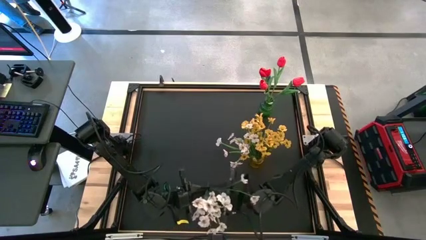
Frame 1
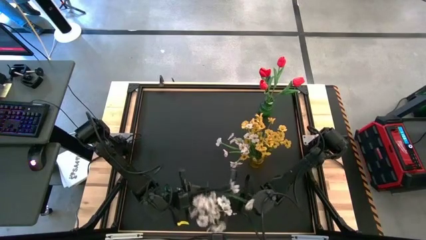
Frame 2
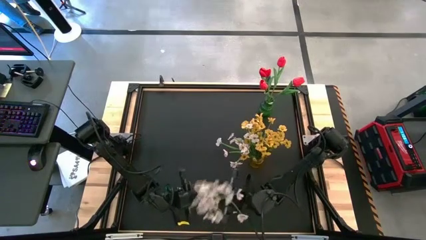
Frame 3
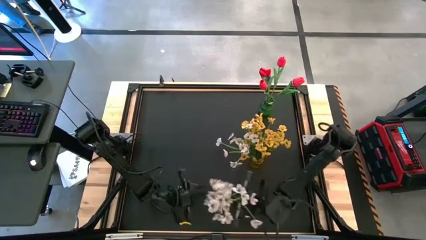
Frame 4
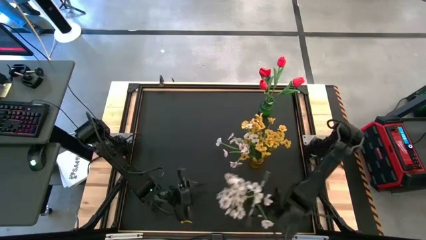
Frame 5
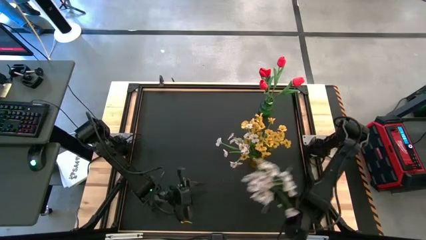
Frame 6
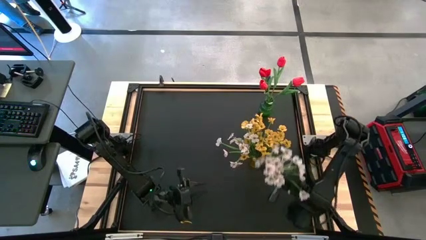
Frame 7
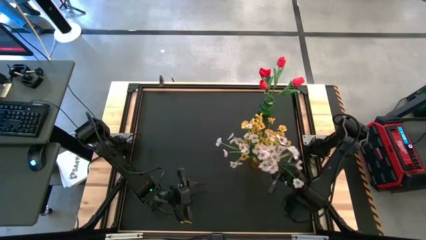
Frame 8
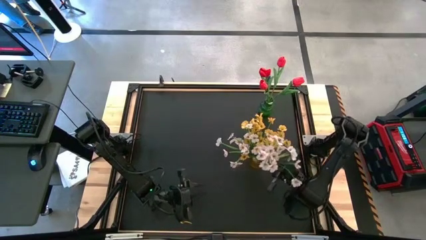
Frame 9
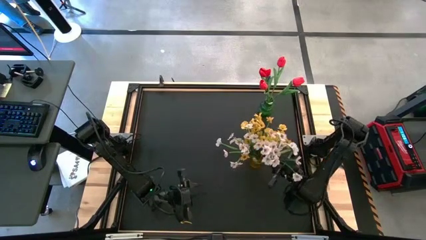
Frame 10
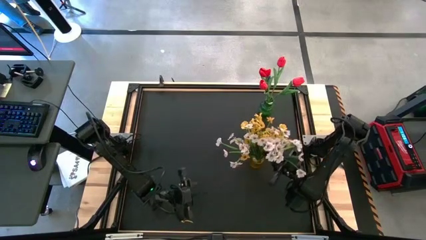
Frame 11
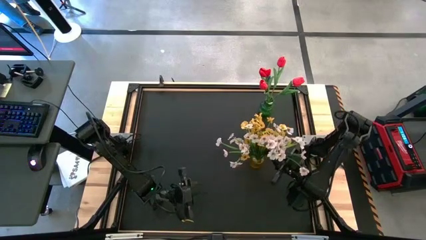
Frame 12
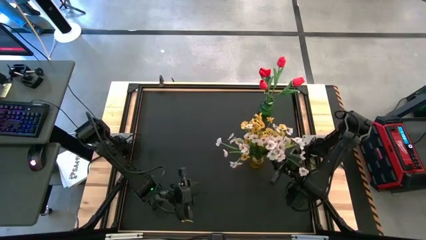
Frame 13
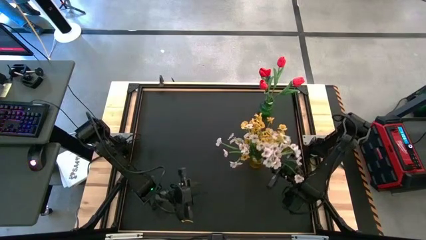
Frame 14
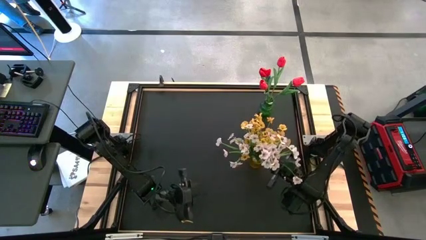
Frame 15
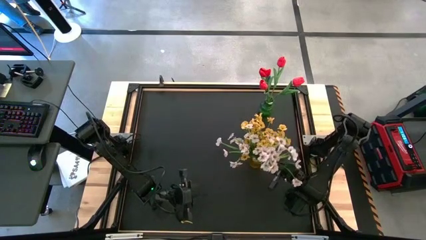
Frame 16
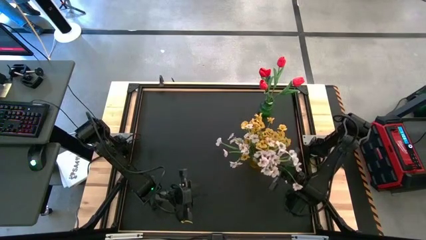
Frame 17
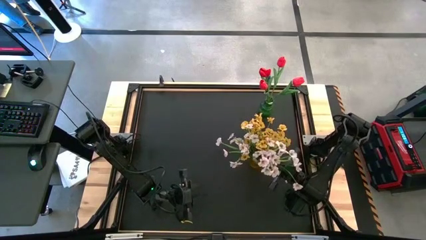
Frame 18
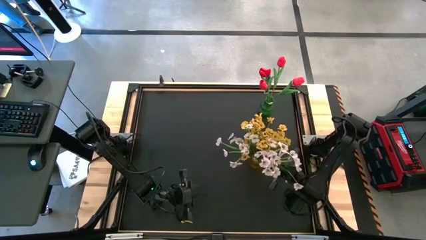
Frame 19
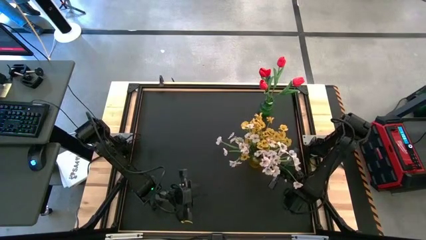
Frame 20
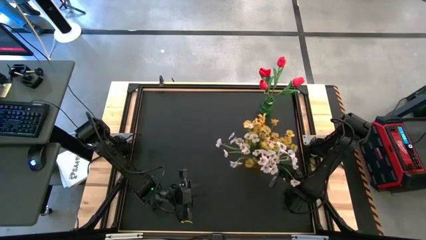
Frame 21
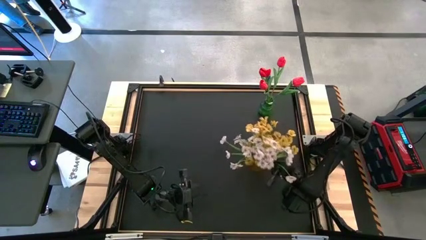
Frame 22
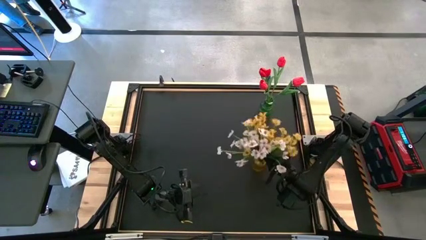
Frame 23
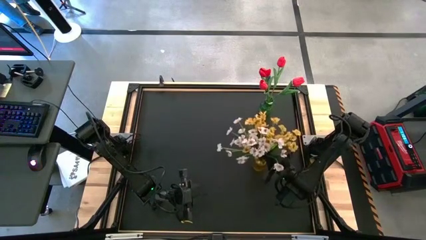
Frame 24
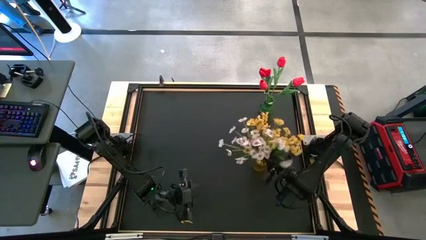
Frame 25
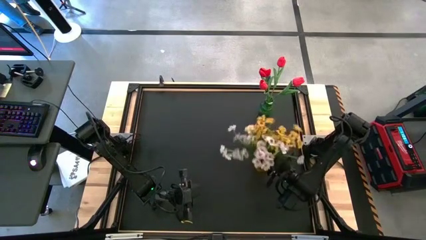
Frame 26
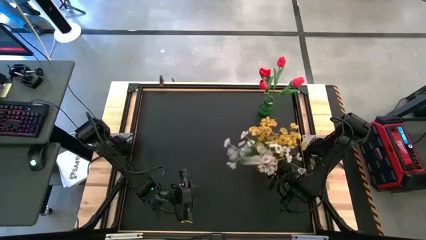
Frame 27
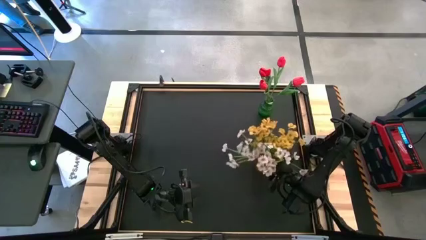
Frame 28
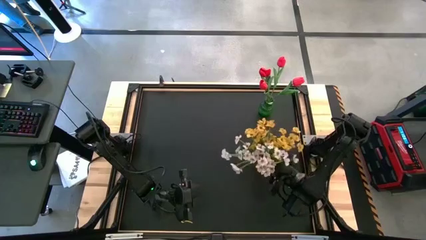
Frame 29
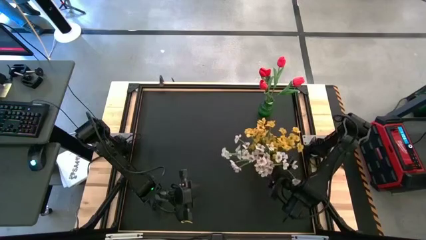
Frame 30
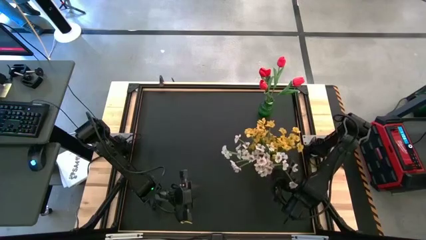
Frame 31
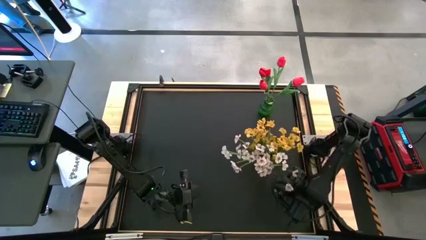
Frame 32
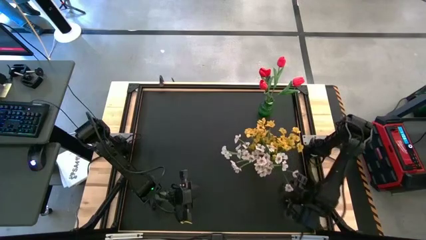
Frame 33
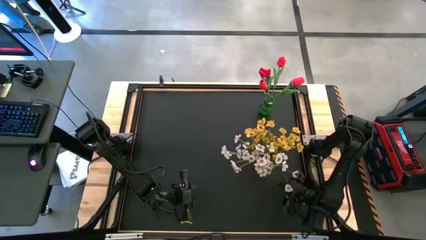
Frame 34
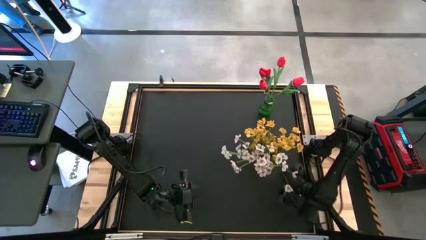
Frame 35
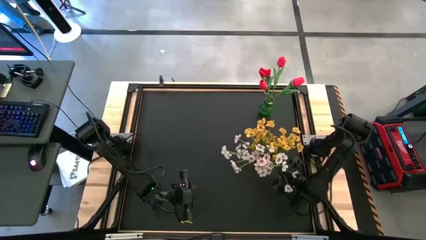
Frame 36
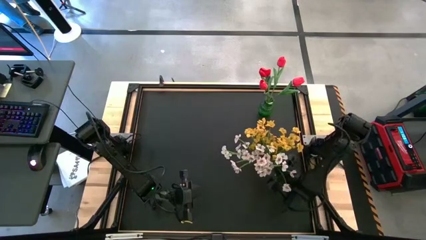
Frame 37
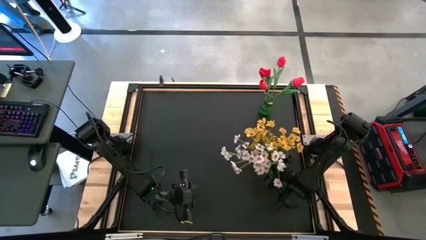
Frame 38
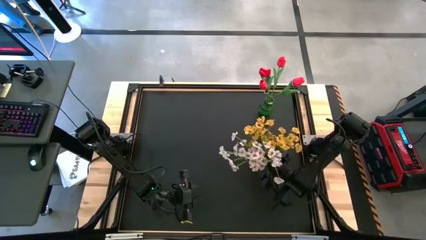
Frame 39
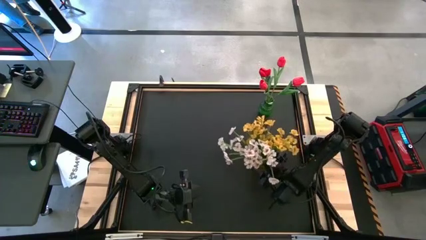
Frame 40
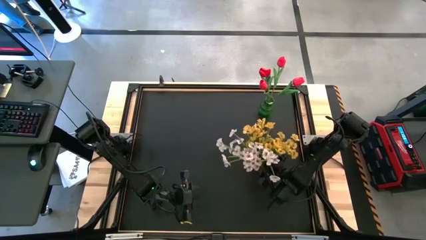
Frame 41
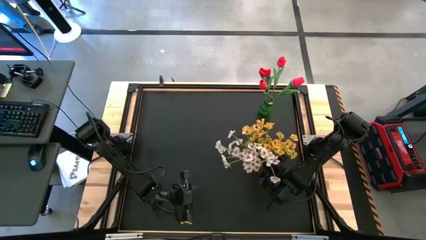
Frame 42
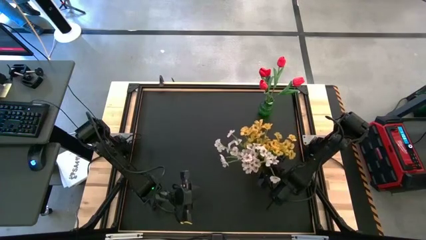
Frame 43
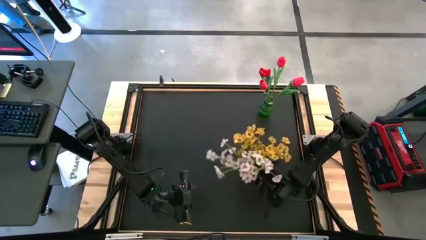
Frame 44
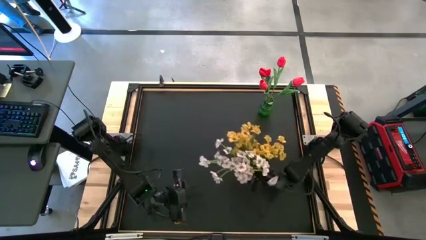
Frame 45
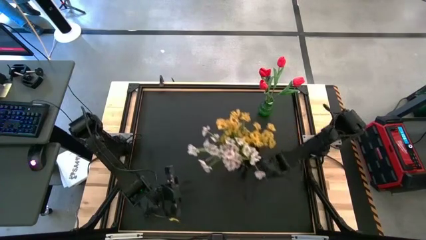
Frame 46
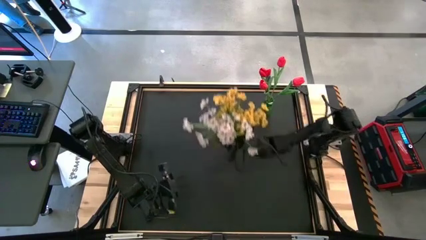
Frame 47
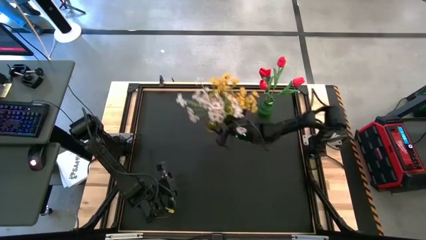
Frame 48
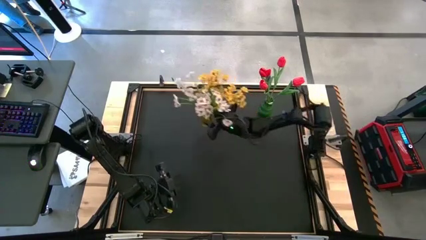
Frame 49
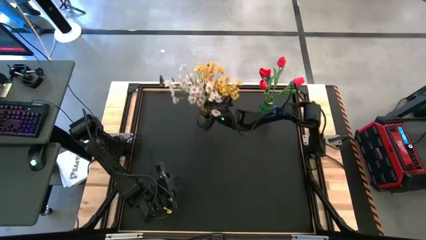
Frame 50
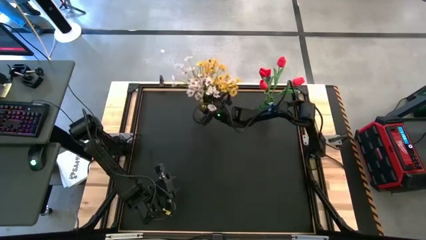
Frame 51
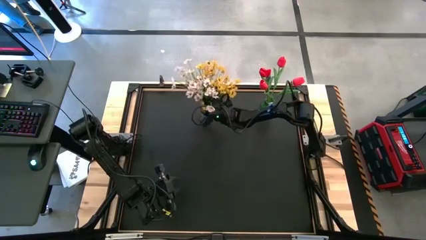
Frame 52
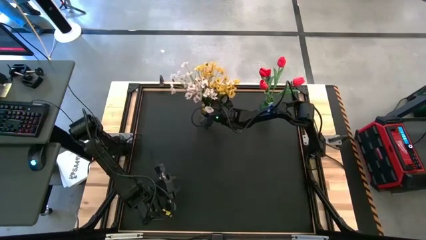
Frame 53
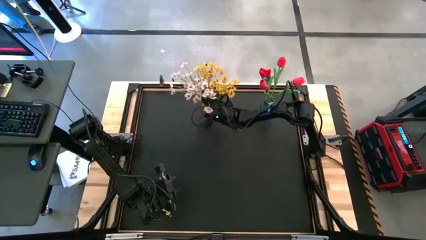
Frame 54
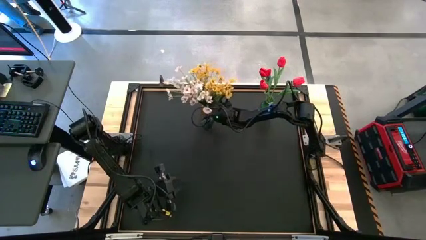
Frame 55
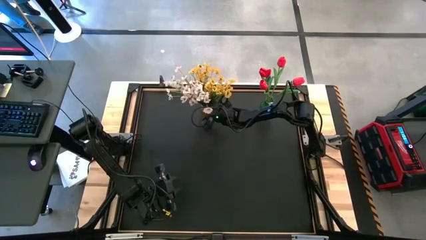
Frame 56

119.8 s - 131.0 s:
Task: Sort flowers into vase by color
Put the white flowers into the yellow vase

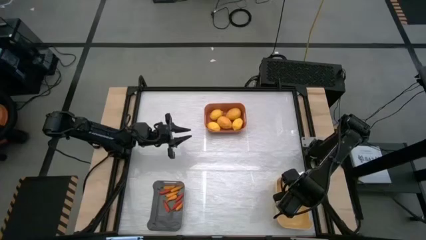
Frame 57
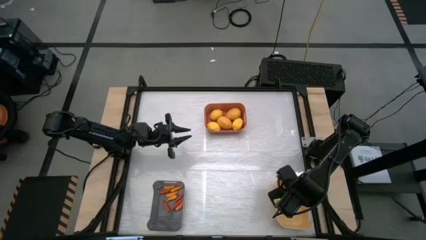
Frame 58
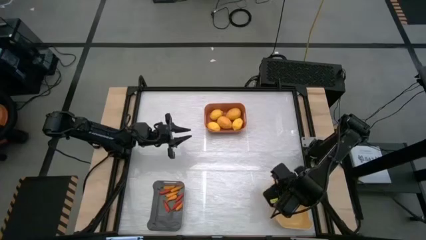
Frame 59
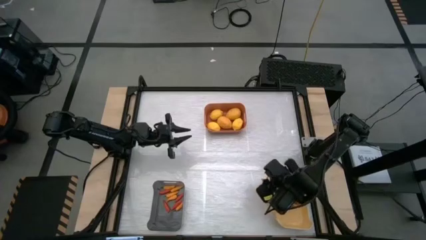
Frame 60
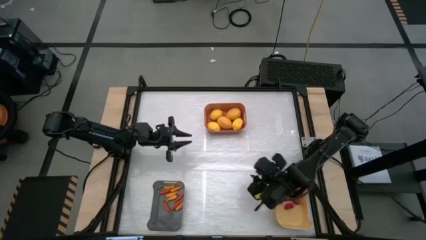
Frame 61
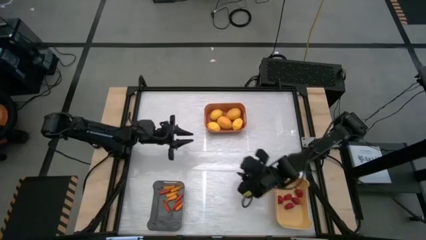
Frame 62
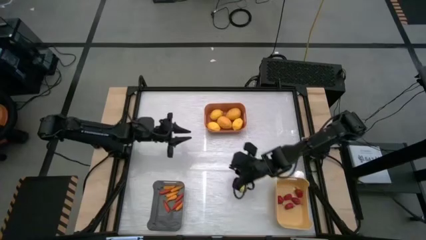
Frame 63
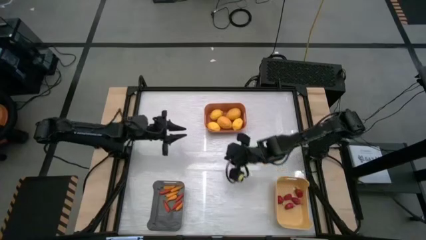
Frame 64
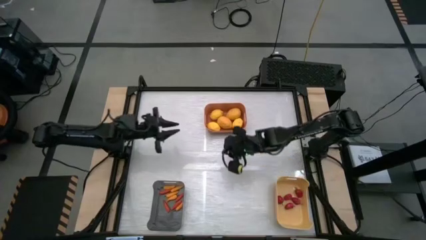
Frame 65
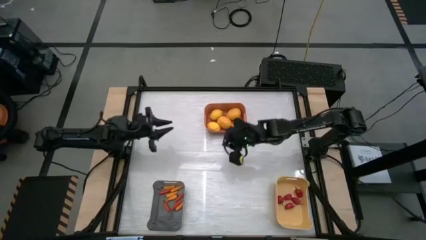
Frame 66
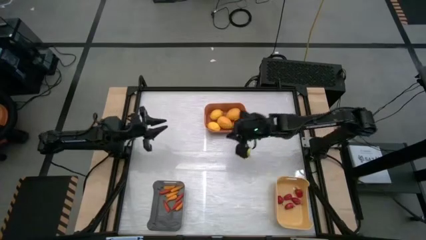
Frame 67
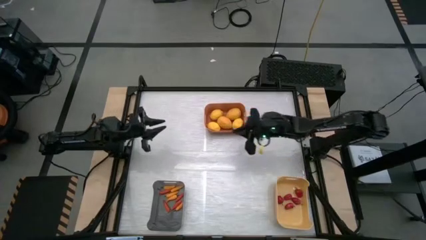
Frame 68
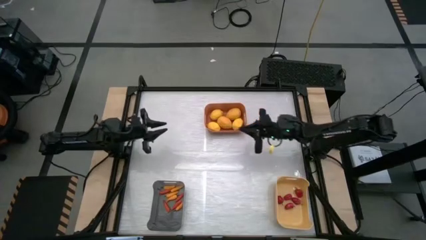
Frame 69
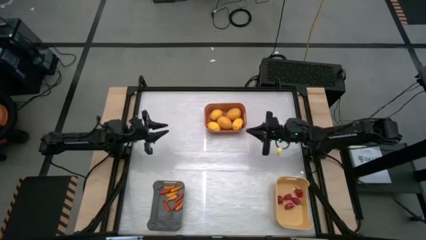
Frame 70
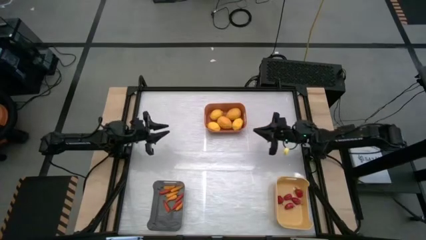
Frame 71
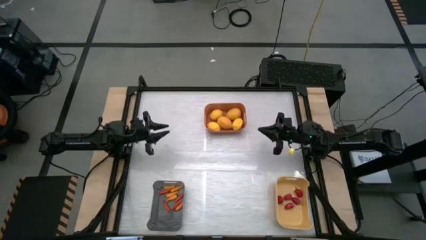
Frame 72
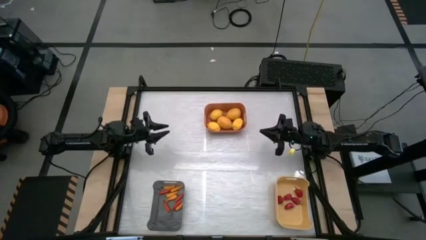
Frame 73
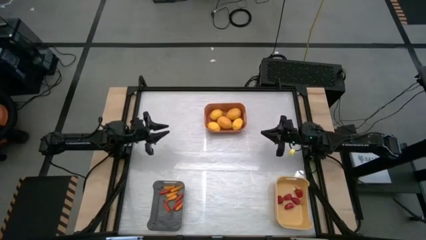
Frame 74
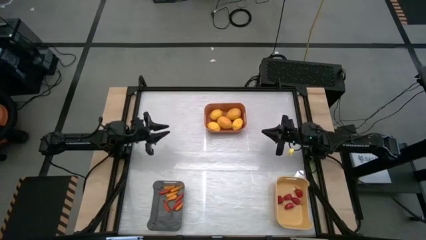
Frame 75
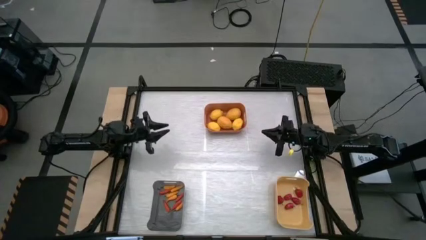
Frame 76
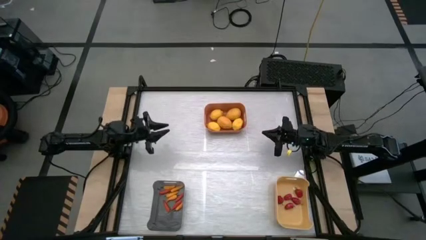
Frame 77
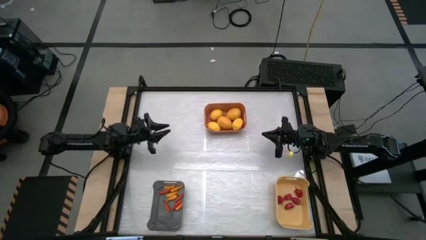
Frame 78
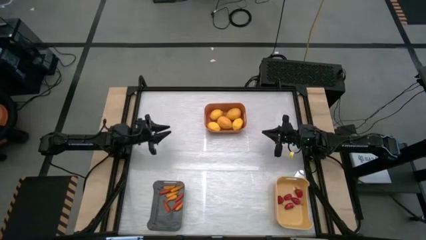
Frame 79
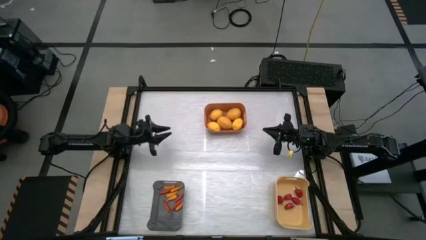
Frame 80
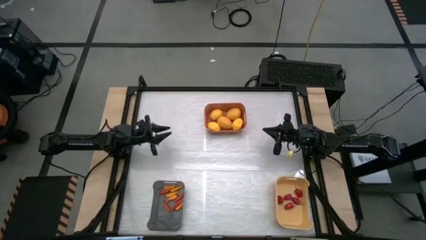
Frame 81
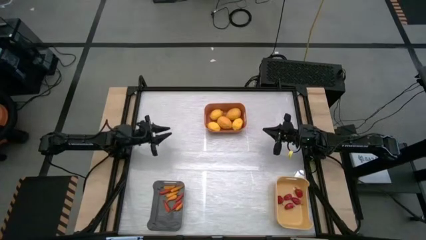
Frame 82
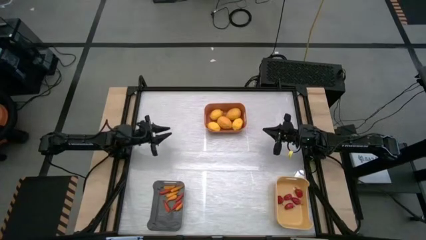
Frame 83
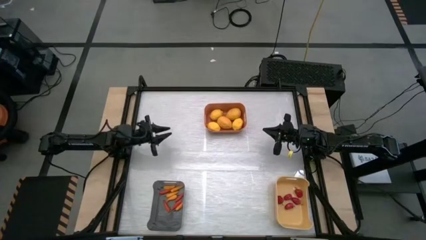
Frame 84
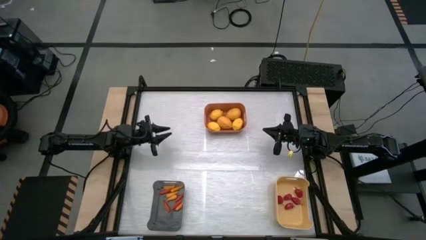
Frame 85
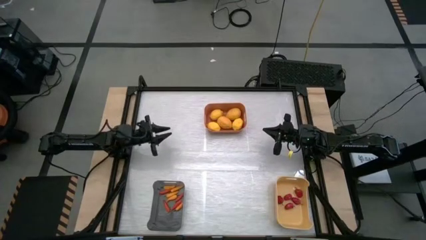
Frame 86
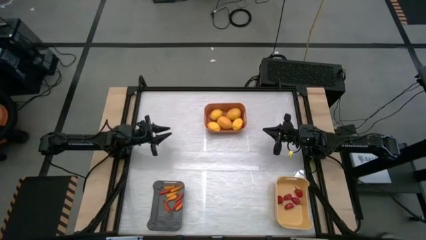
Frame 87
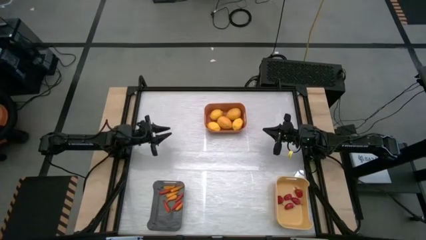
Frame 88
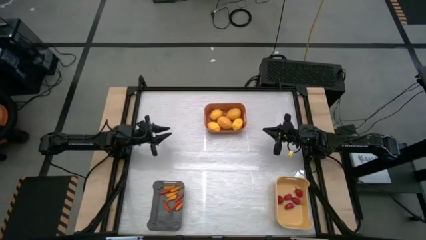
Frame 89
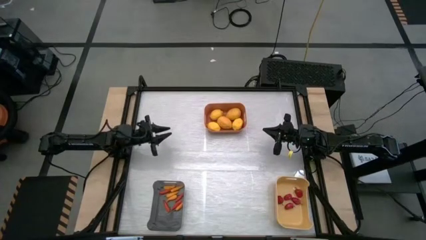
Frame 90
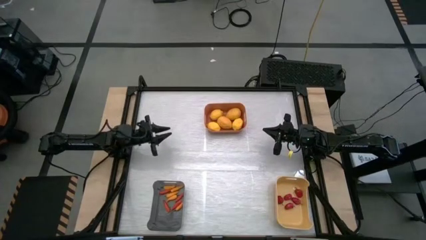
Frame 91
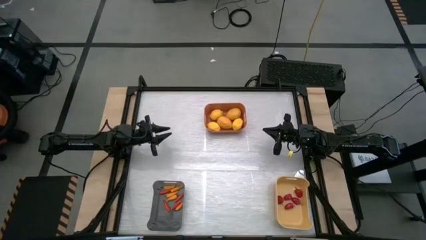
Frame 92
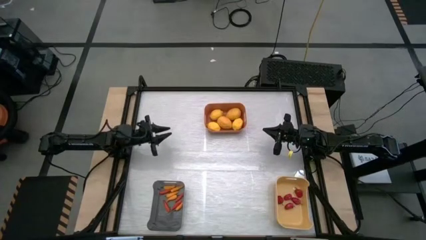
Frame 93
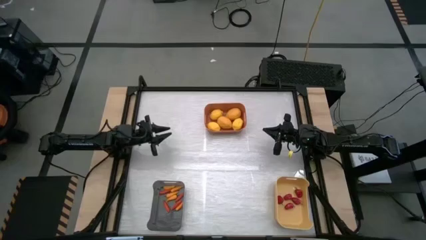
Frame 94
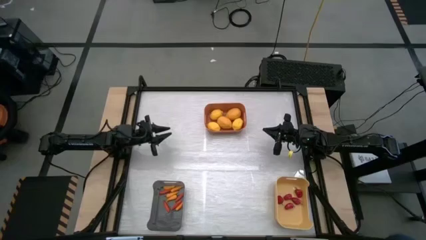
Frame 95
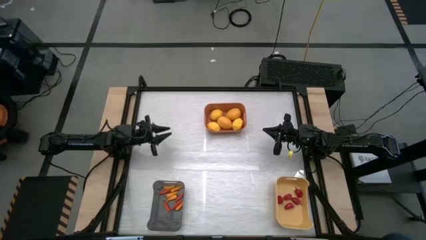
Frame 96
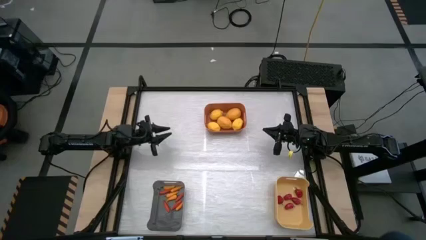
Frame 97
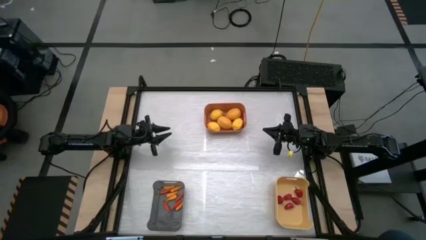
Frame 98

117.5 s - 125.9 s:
Task: Sort produce into baskets
Return to Home Position
